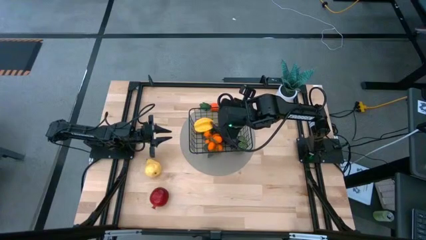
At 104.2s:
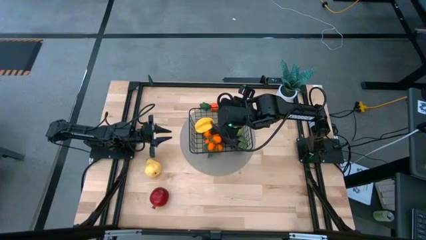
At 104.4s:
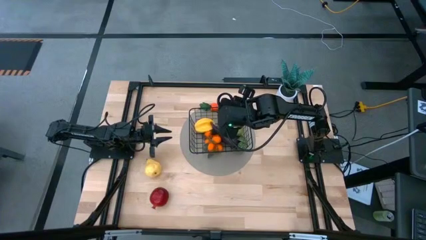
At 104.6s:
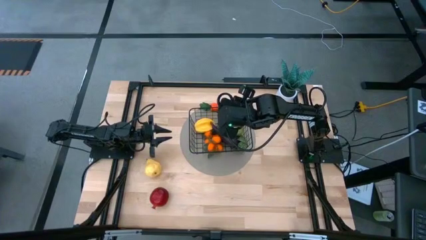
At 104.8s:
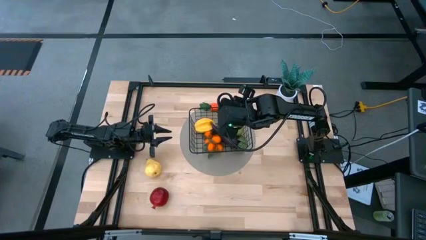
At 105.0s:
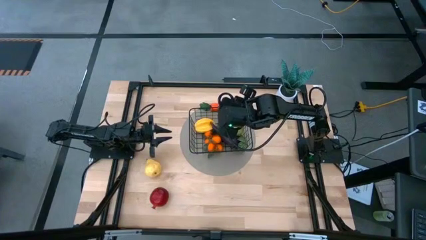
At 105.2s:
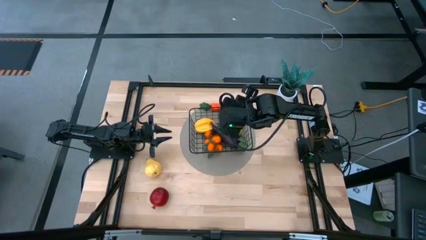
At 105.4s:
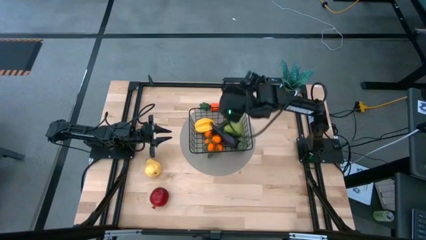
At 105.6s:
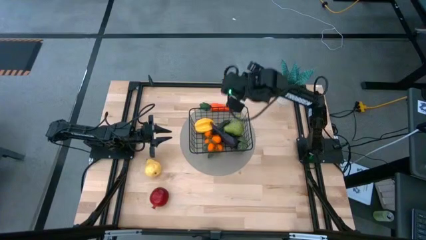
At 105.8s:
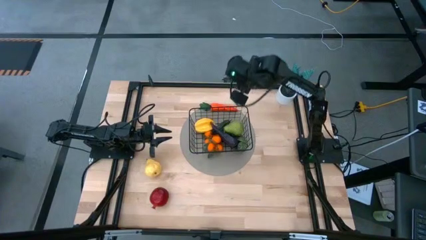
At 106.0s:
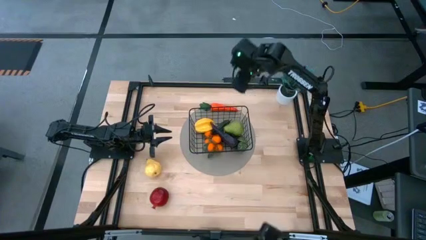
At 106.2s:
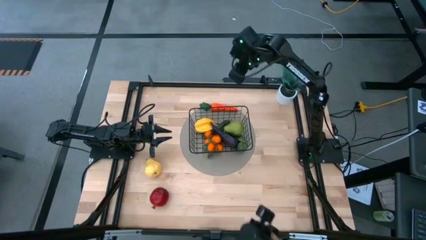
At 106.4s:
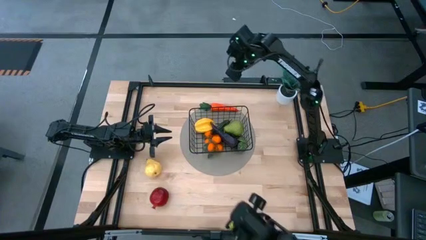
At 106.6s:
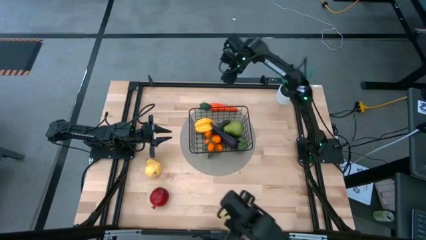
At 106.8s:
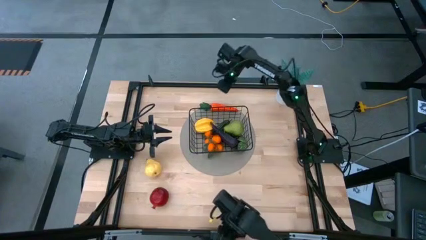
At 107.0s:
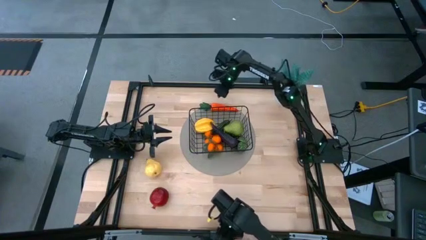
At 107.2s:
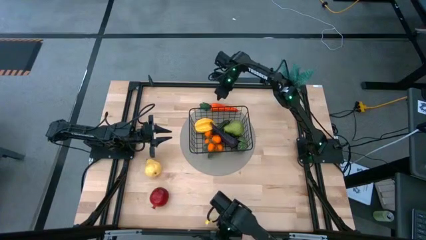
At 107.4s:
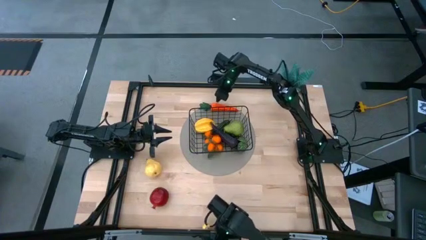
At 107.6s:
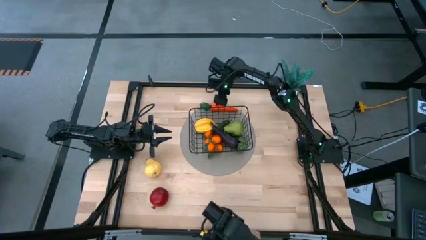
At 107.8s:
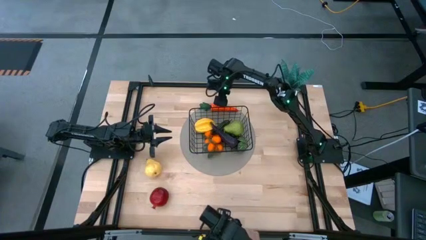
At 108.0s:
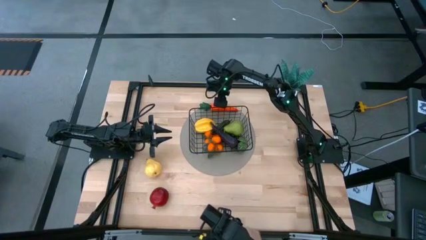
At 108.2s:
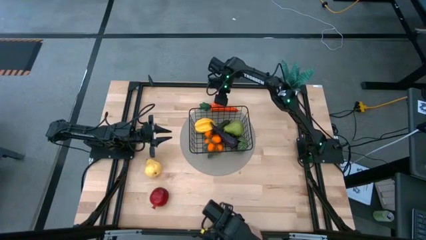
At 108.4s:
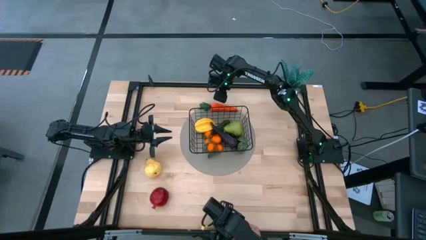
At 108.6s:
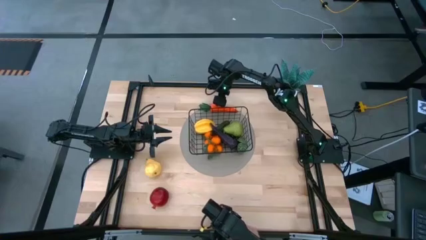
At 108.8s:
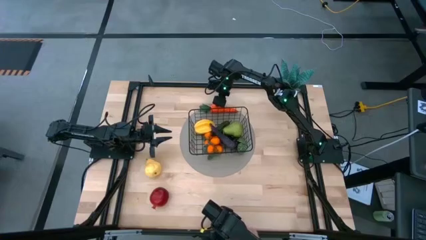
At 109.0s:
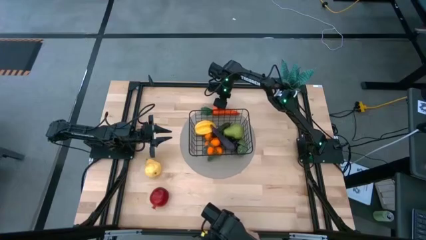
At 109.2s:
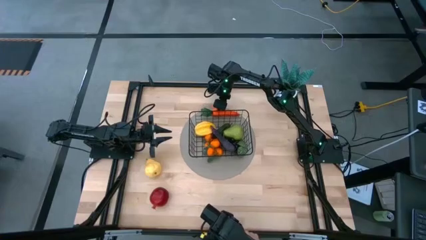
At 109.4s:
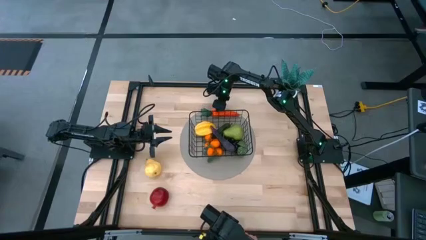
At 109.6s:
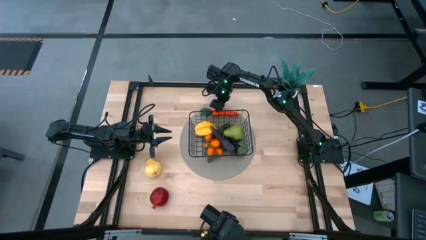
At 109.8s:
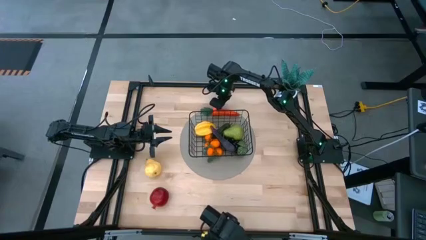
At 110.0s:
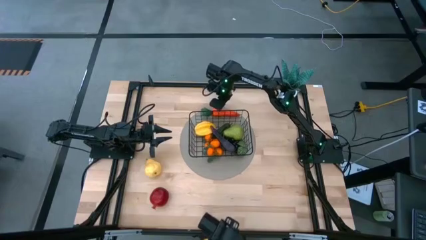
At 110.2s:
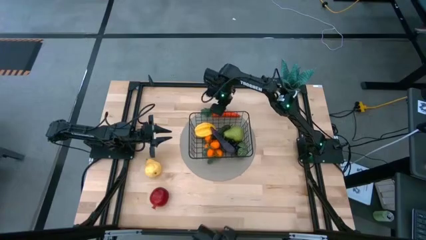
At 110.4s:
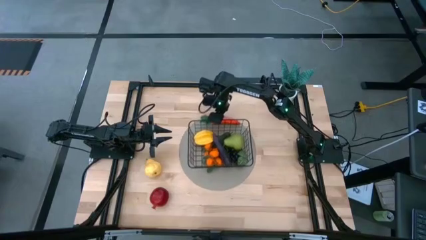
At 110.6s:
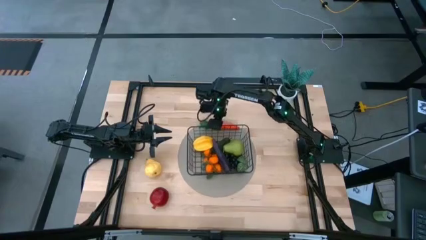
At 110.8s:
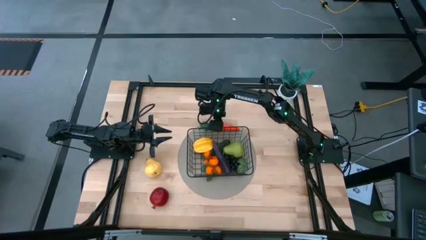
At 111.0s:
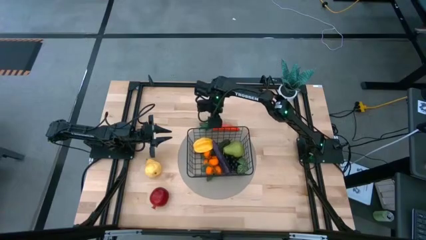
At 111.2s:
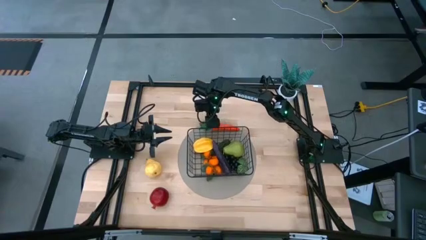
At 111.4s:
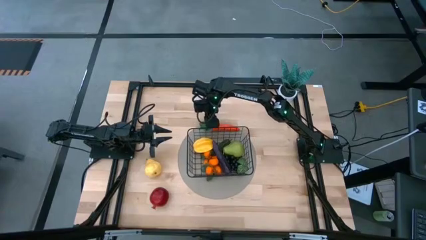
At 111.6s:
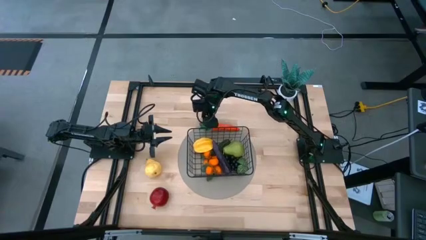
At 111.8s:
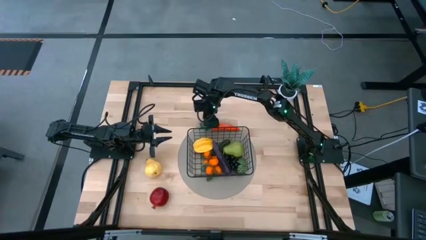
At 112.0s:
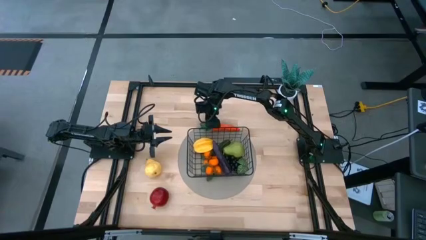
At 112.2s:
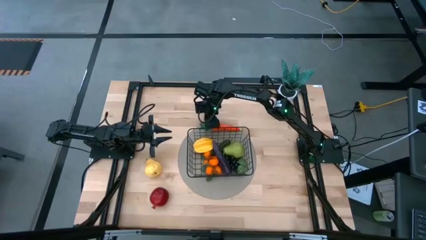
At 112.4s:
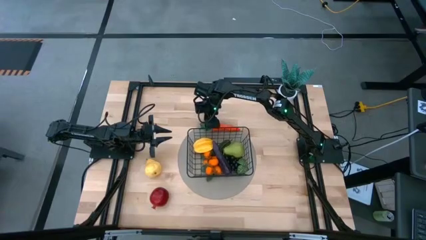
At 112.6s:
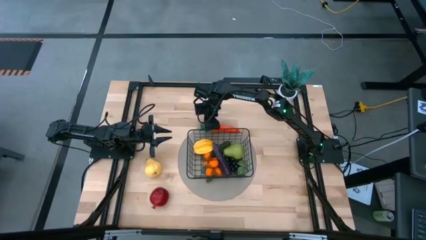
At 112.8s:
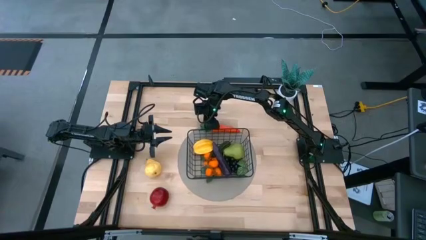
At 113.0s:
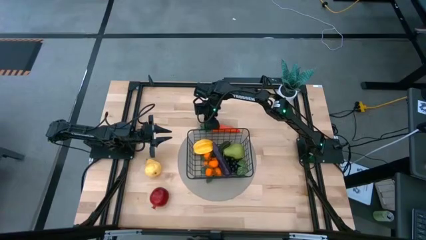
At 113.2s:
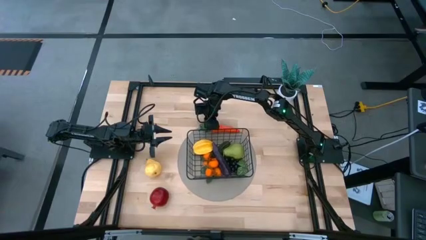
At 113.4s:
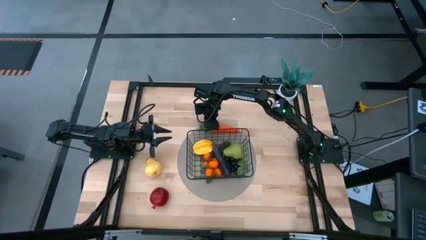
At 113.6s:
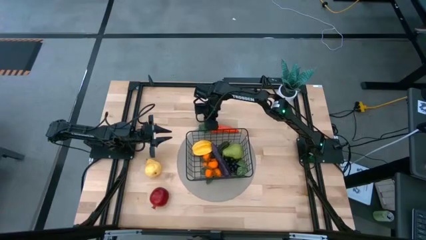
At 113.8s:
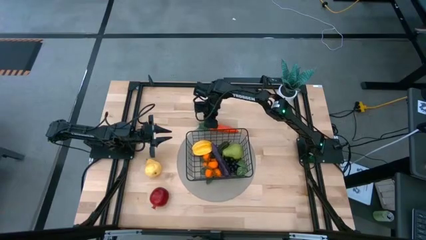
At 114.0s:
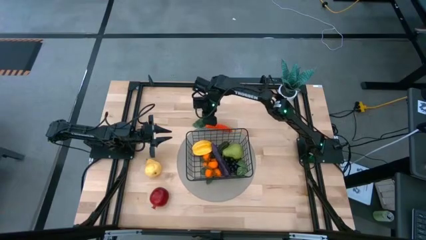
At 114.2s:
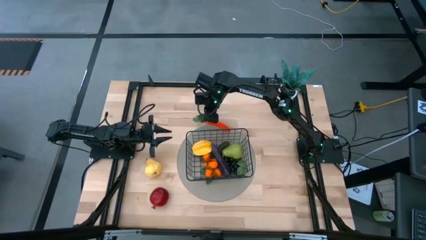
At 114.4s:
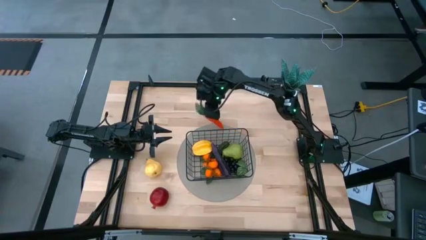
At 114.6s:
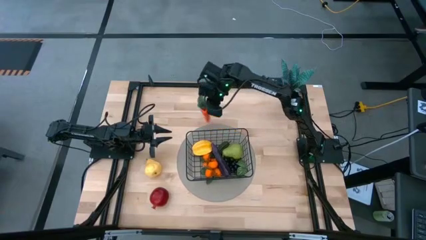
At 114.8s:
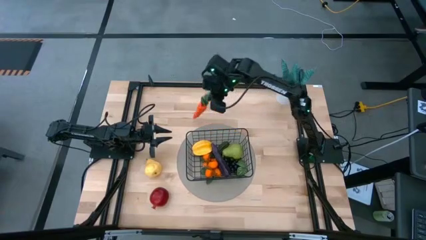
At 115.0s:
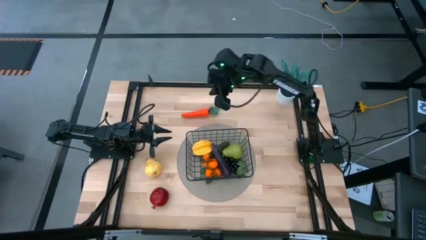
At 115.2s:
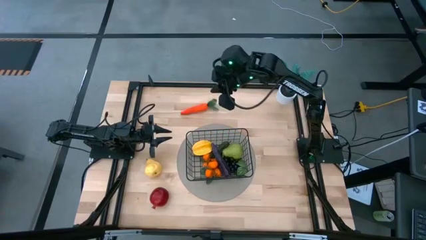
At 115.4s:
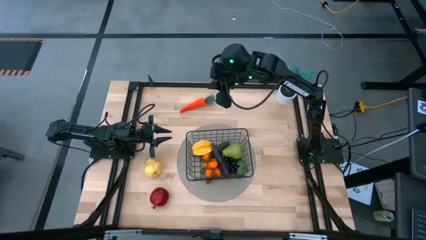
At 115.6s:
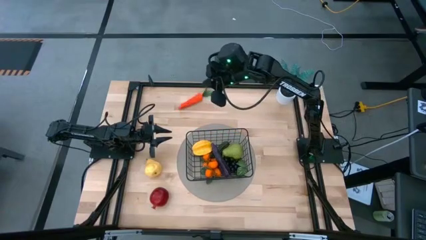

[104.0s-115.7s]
Task: Build produce basket
Put the carrot in the mesh basket

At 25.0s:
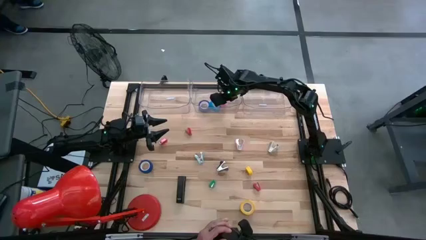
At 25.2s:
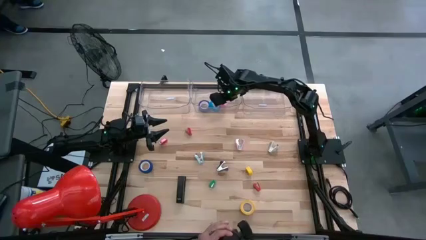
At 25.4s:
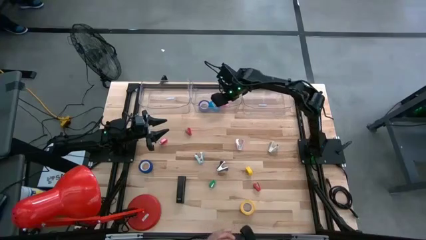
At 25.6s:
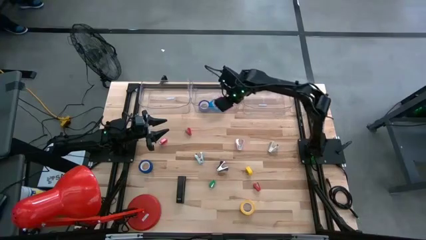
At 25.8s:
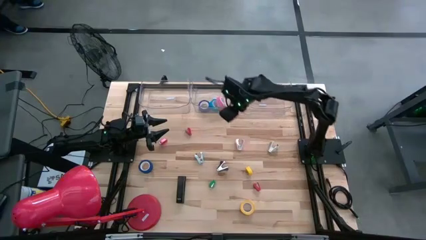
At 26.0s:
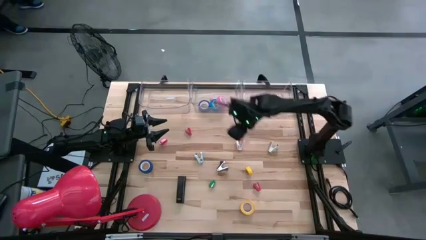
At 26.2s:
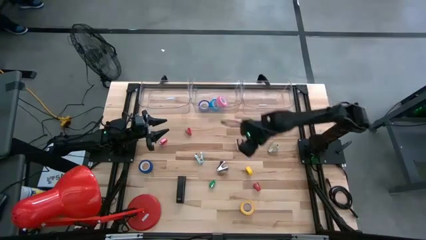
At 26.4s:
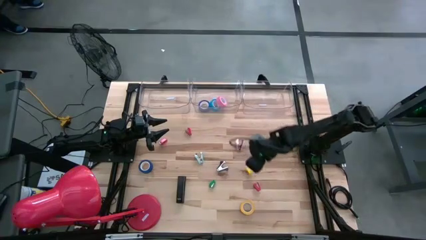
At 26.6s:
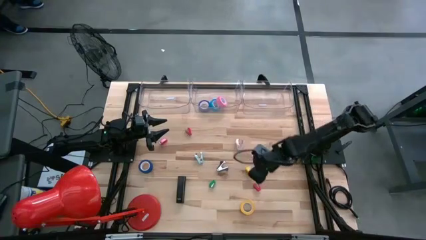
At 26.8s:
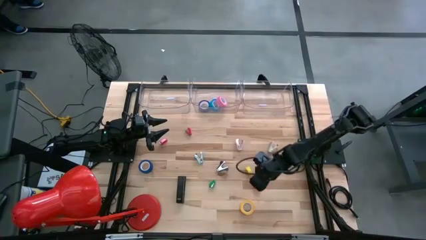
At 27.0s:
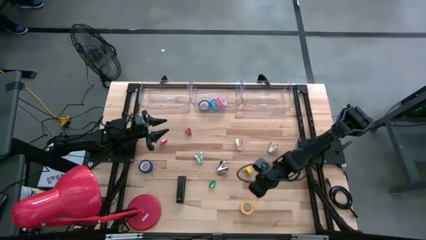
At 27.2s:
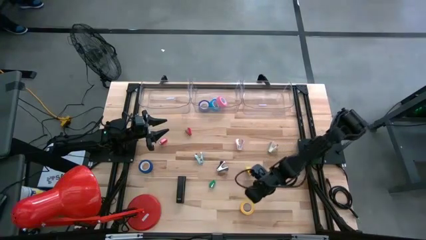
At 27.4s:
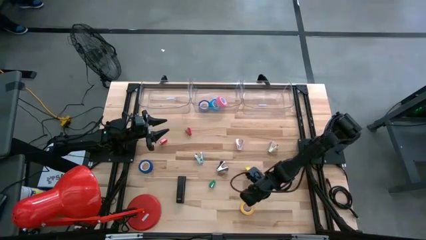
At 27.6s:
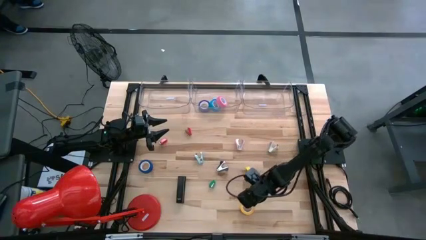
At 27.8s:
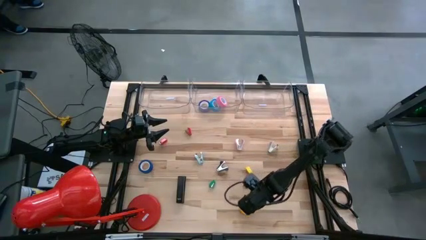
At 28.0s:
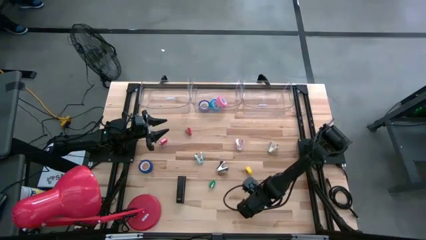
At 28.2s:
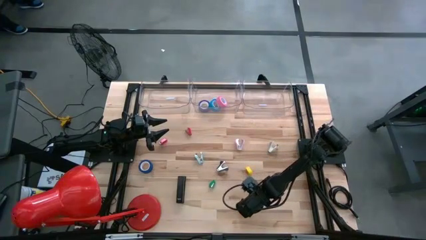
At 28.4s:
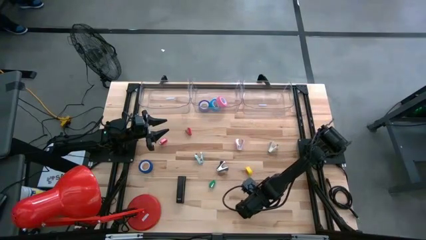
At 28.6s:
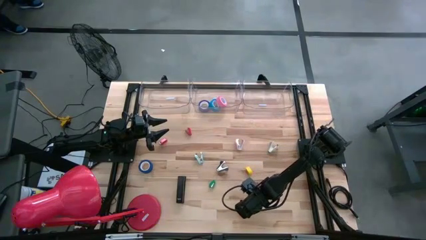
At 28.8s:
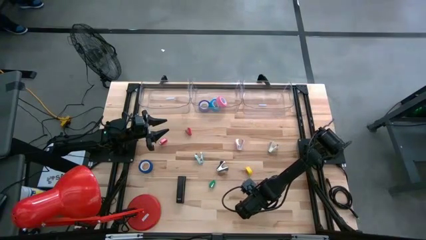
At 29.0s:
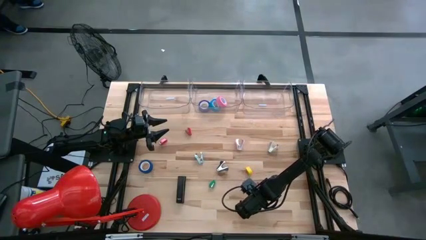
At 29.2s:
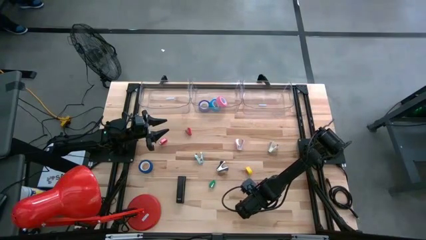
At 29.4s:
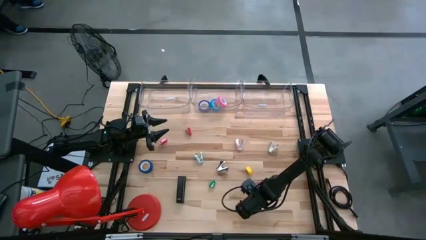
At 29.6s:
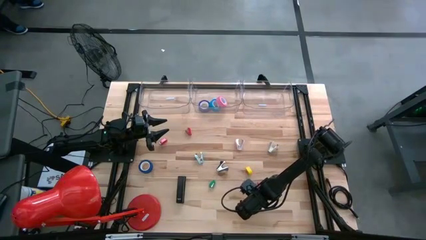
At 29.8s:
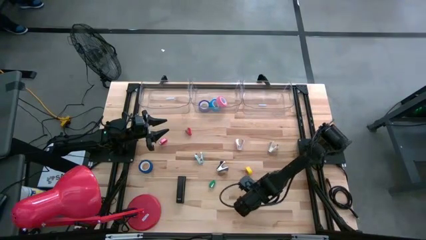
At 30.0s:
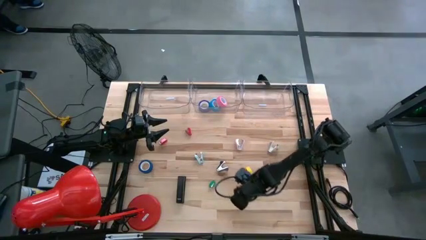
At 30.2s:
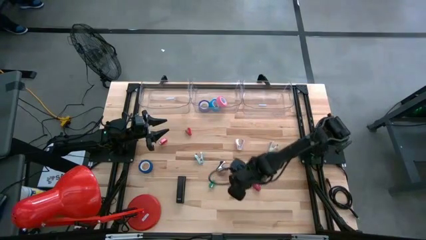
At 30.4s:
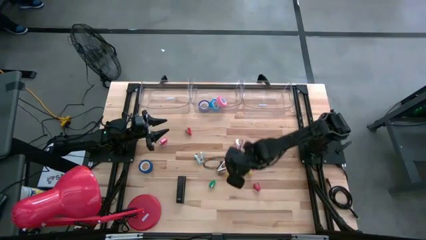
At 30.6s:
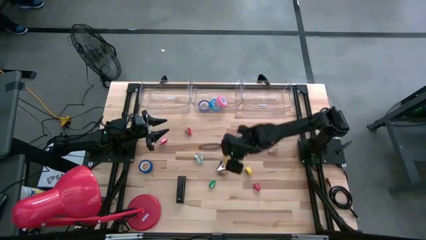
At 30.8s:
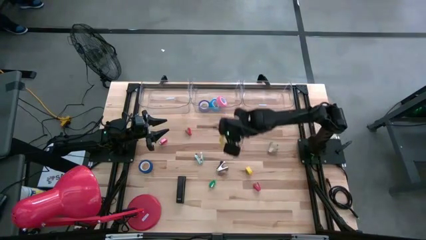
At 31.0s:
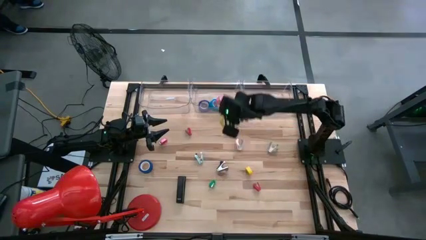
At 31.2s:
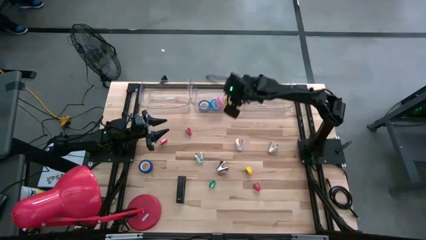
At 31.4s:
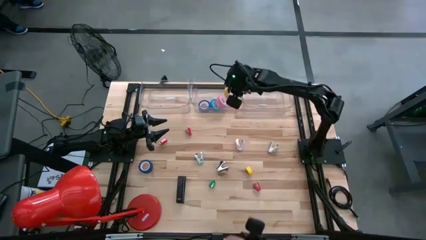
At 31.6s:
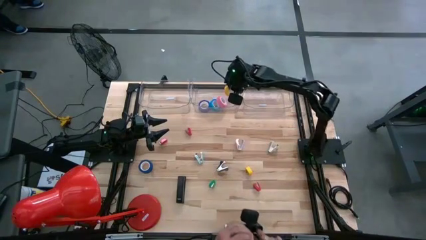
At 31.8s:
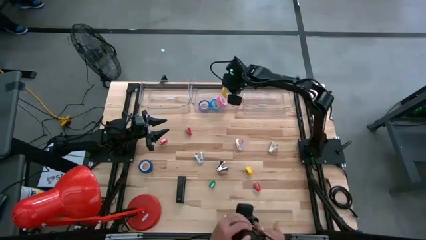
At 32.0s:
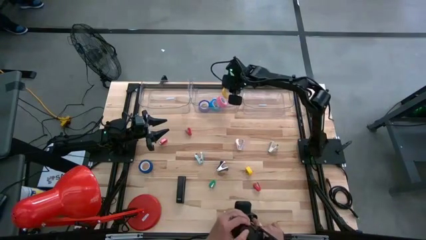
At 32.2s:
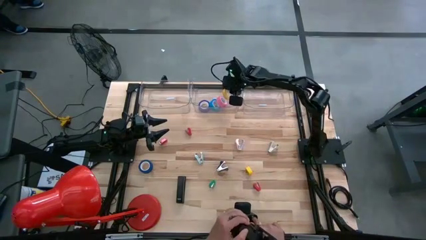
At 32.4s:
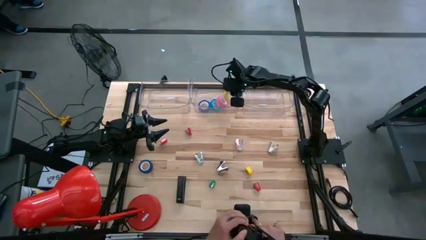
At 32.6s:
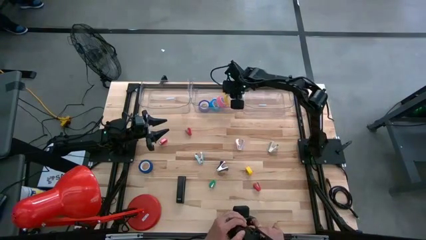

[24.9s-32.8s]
Task: Pick and place Stapler, Stapler remover, tape
Put the yellow tape into the middle transparent bin
